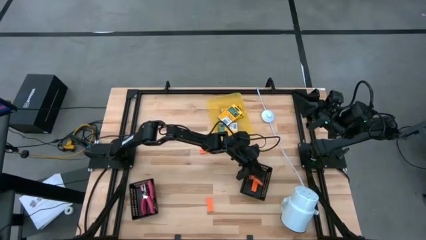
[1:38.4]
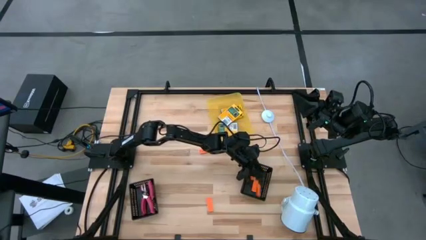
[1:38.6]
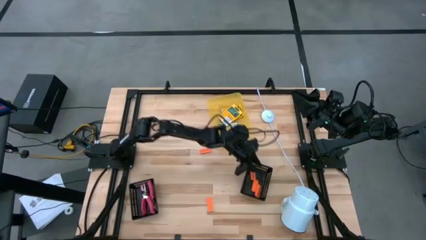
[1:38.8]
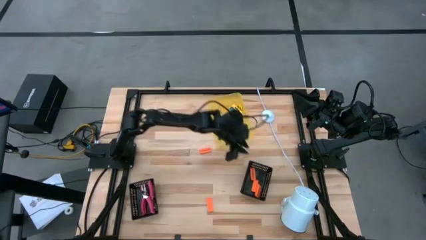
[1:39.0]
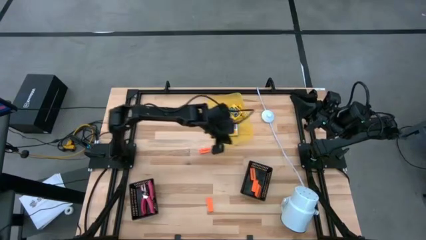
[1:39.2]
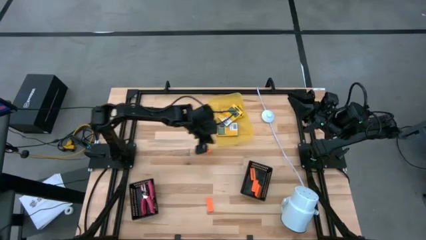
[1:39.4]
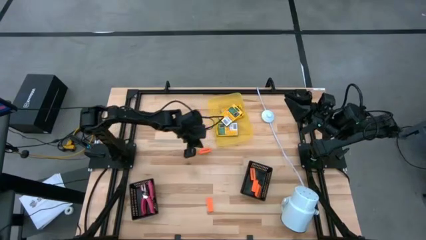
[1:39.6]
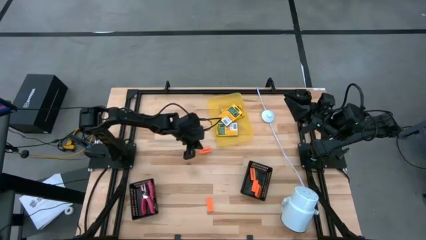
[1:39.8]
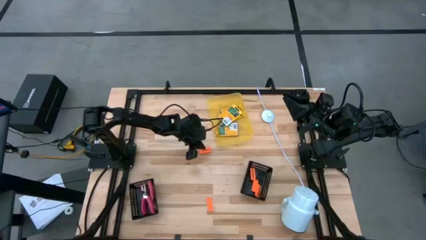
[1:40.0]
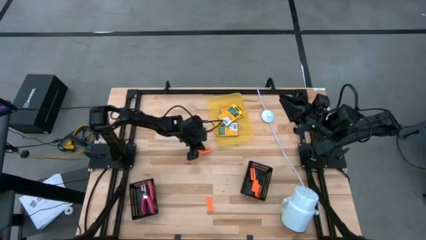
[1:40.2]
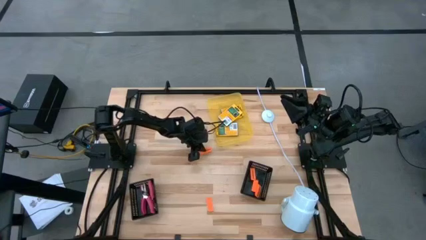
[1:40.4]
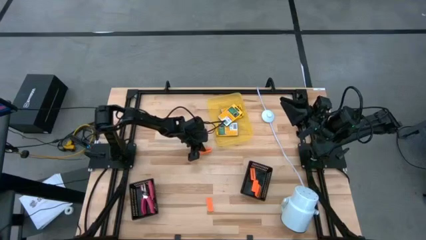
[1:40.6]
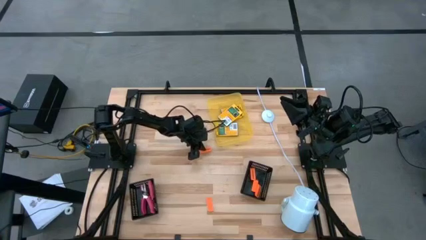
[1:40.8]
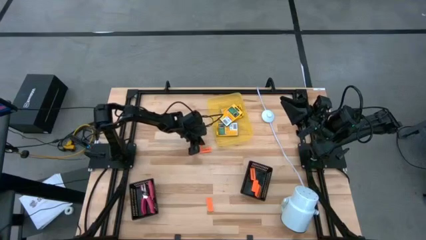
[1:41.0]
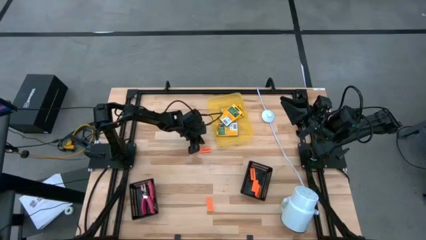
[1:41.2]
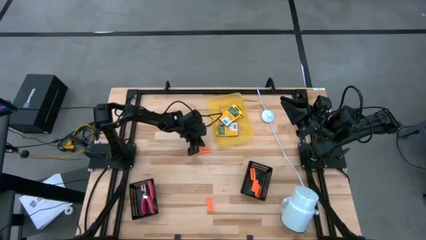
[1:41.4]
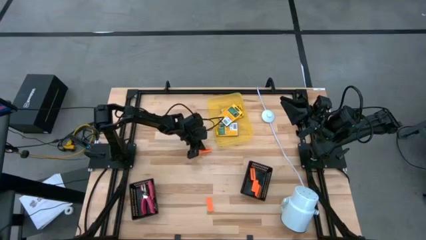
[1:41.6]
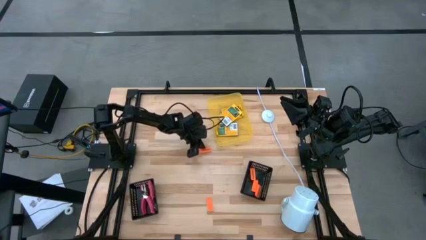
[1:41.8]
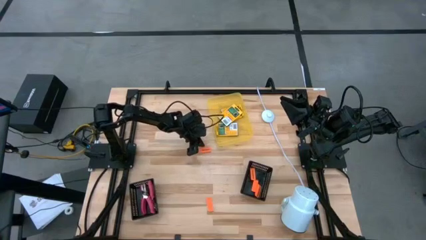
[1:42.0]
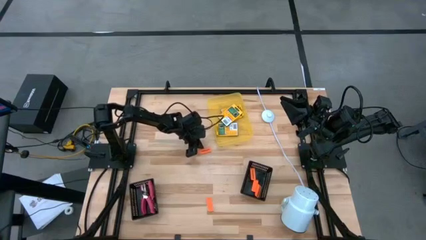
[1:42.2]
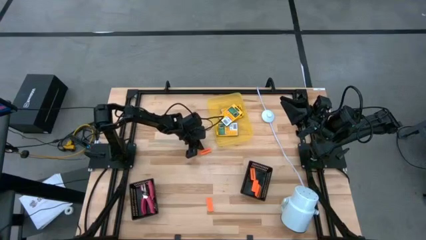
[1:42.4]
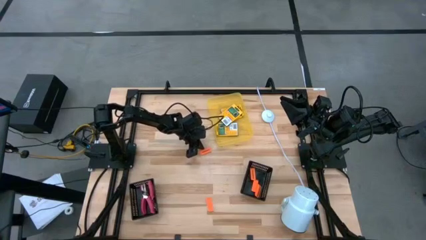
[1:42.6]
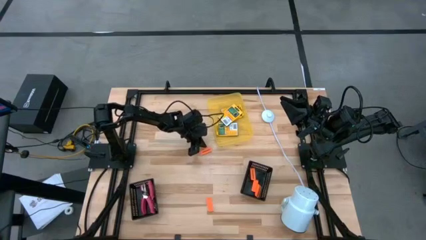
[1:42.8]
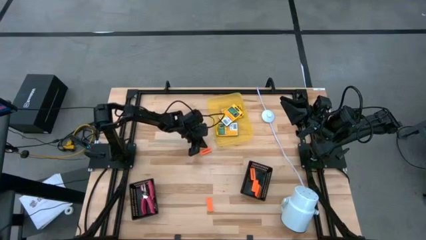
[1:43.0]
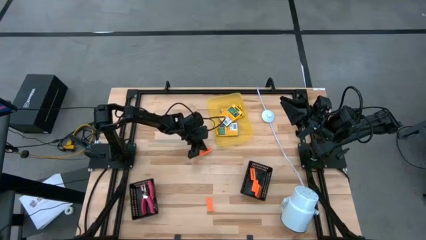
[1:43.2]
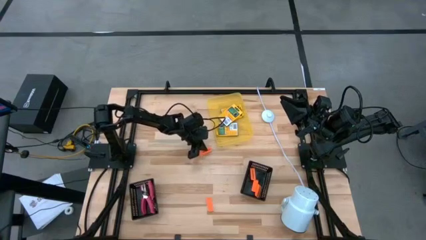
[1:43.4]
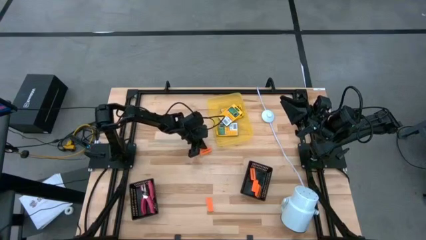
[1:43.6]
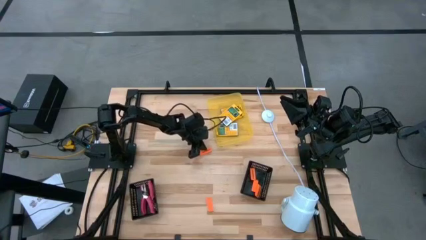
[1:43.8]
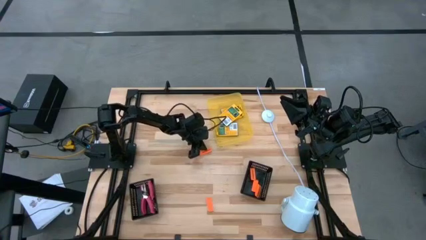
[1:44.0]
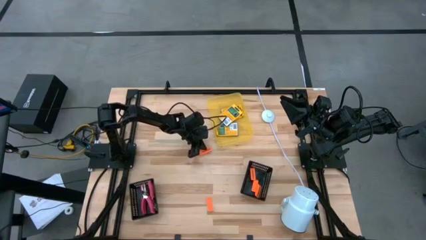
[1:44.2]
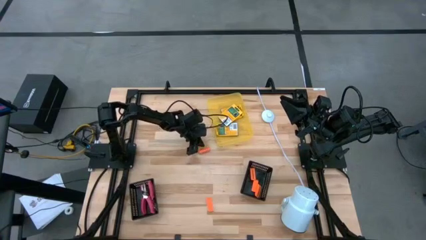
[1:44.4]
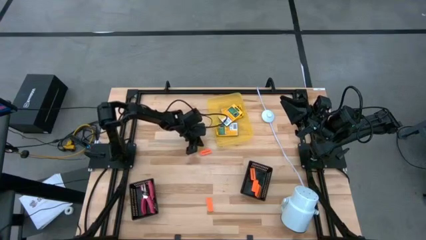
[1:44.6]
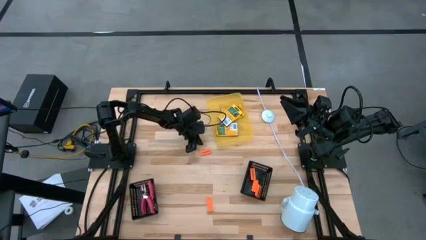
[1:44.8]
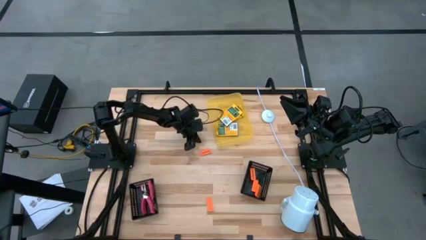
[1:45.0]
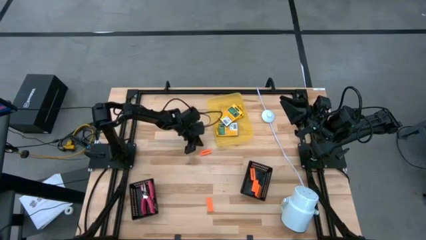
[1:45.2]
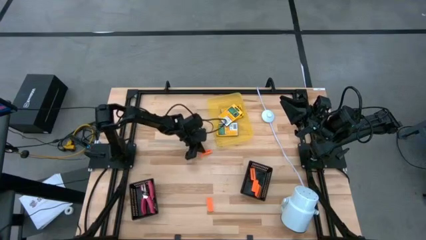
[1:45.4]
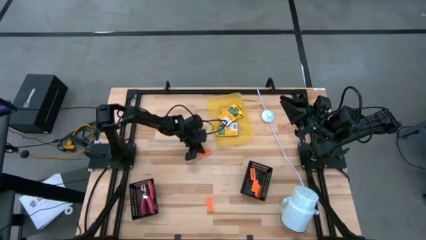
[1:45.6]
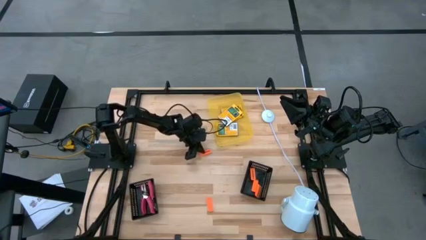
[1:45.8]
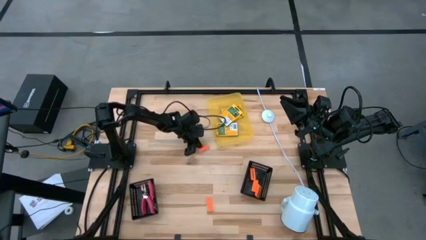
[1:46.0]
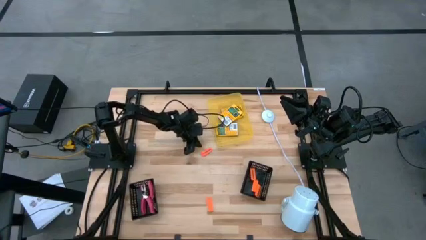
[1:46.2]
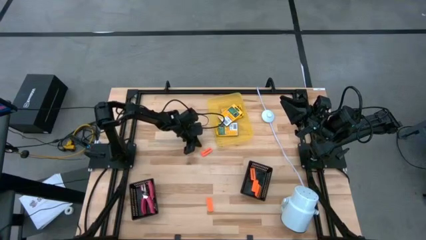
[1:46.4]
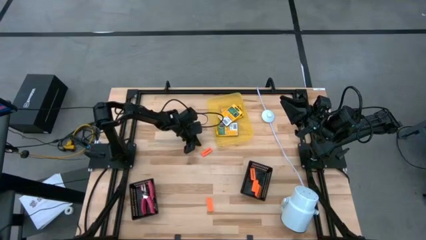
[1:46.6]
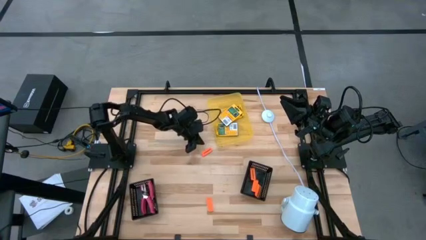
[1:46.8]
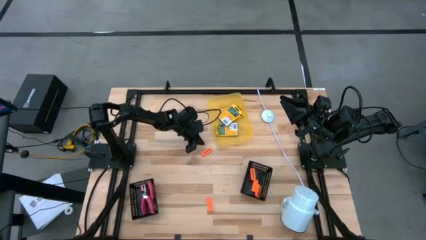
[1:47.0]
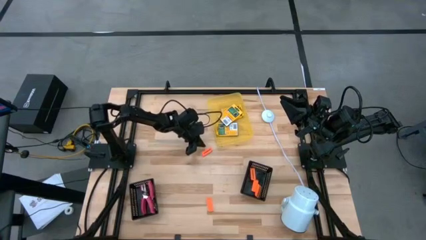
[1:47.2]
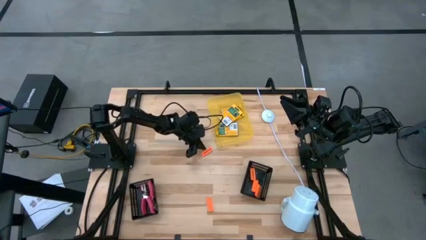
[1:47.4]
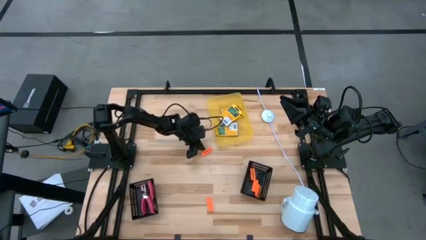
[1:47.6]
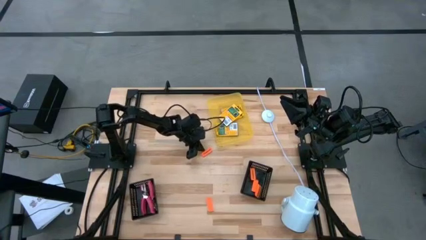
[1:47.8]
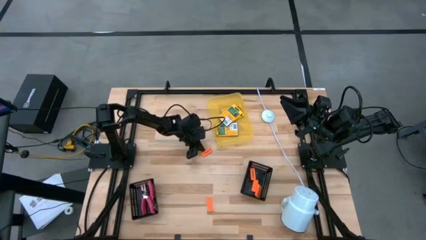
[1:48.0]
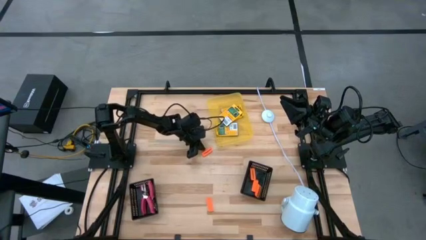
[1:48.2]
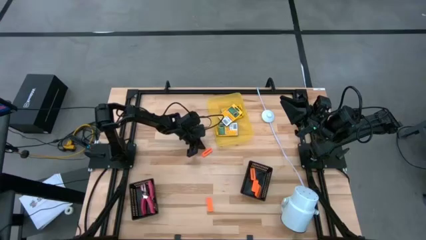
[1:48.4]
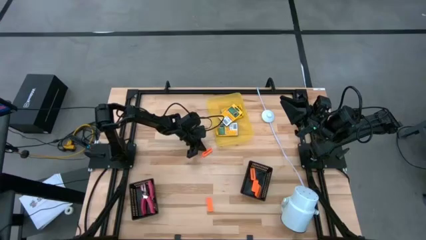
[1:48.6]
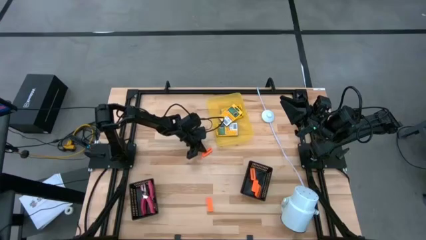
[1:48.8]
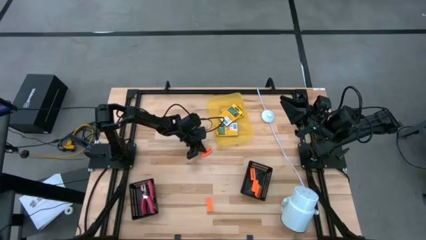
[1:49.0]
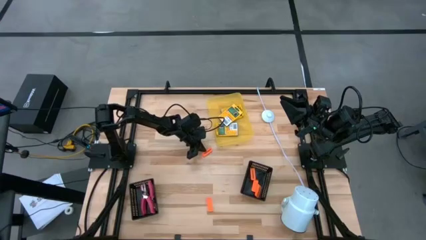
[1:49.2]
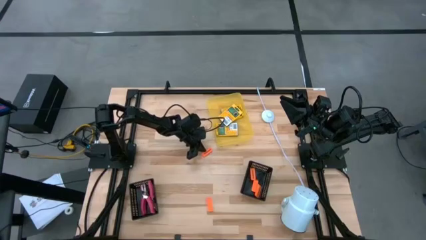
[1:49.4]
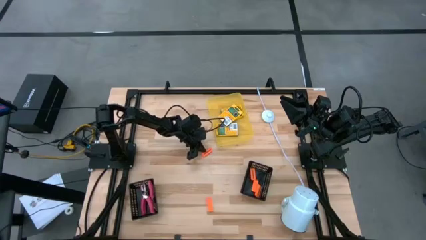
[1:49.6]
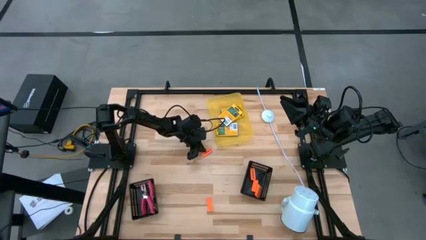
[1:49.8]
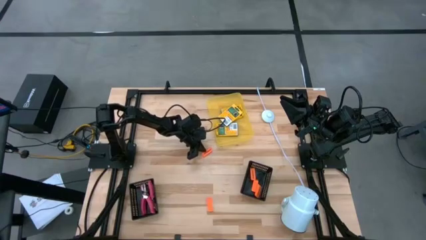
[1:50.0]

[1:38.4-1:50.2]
Task: Pick & Place School Supplies
Put the orange eraser into the right black bin

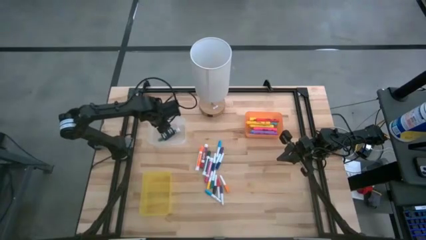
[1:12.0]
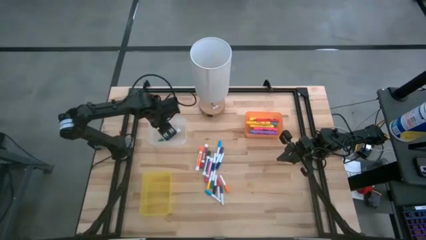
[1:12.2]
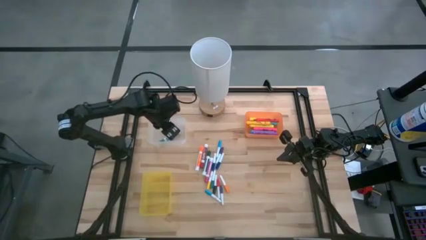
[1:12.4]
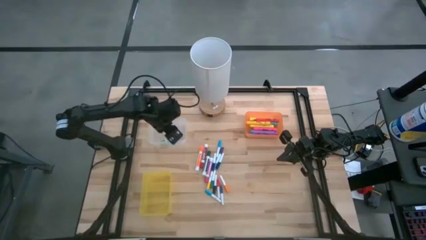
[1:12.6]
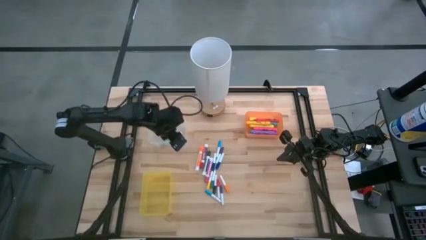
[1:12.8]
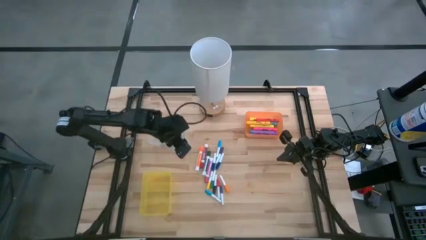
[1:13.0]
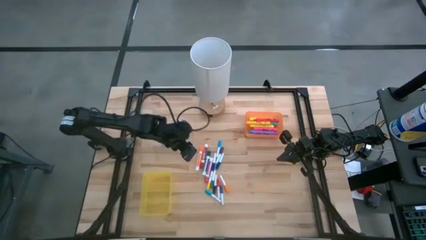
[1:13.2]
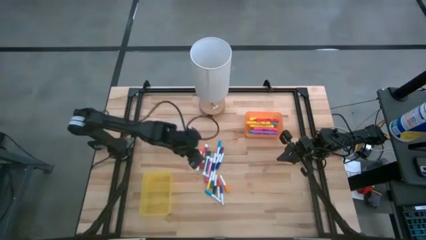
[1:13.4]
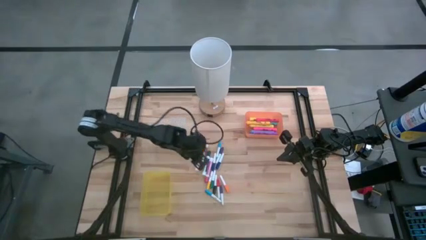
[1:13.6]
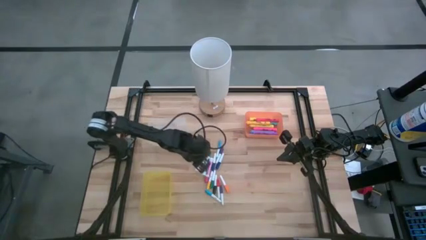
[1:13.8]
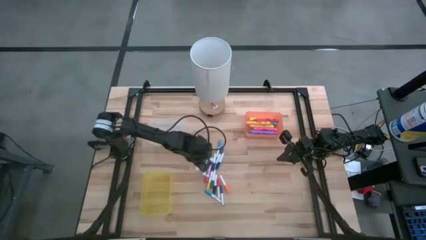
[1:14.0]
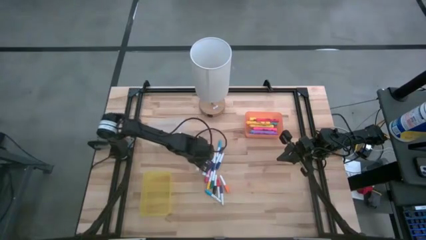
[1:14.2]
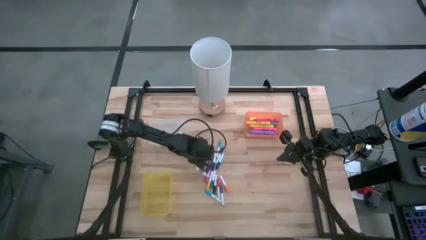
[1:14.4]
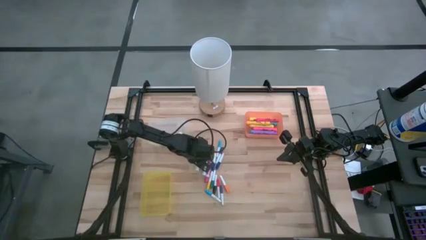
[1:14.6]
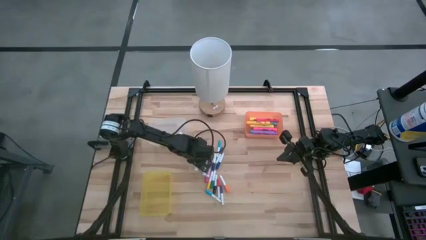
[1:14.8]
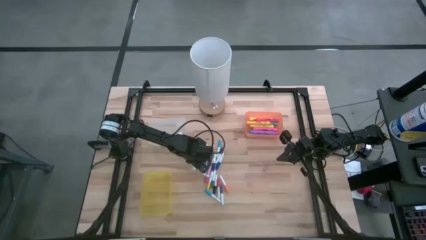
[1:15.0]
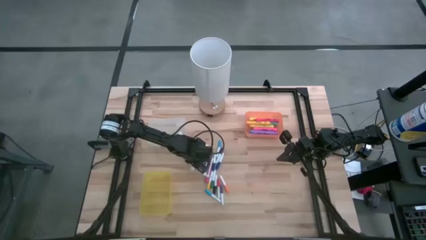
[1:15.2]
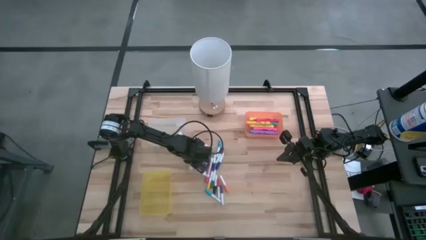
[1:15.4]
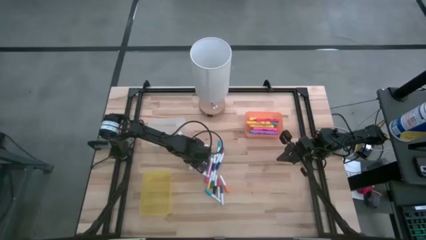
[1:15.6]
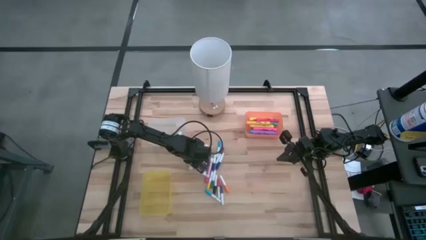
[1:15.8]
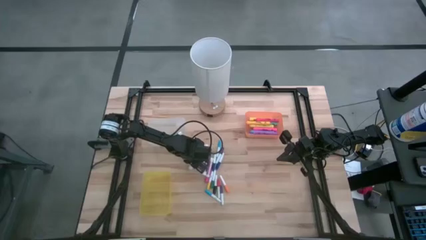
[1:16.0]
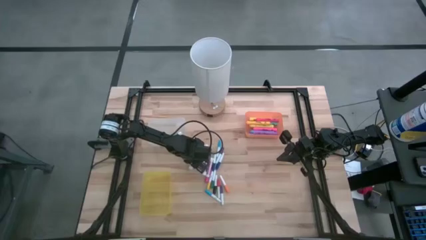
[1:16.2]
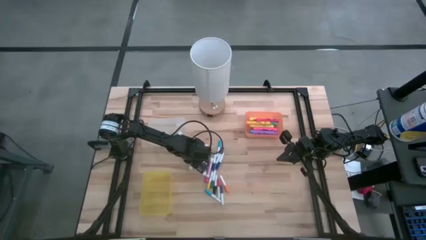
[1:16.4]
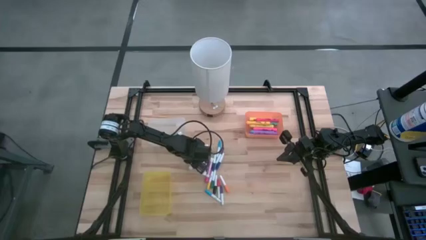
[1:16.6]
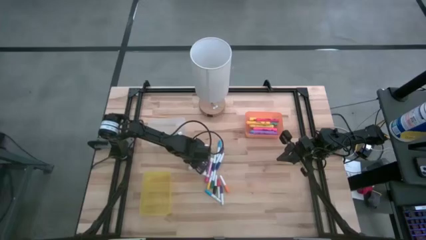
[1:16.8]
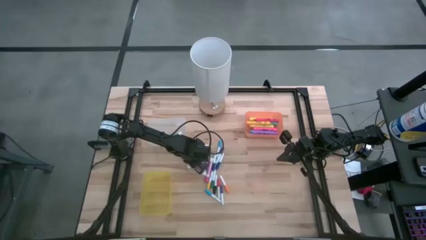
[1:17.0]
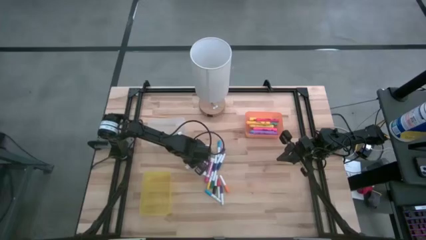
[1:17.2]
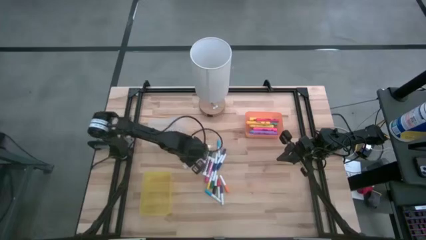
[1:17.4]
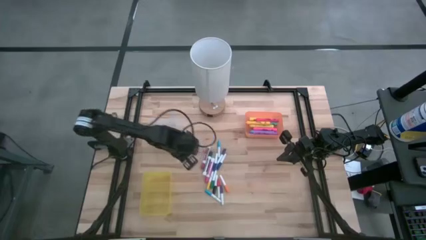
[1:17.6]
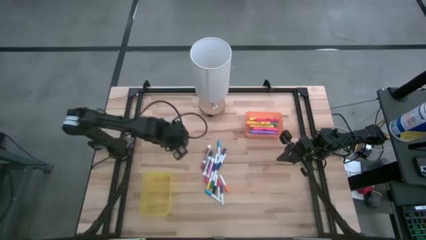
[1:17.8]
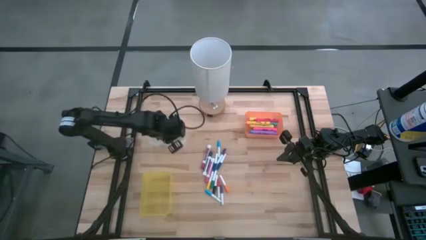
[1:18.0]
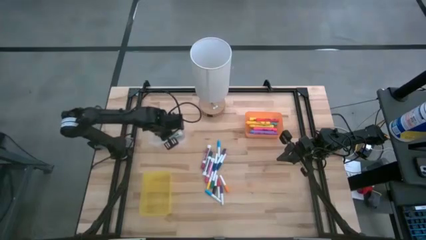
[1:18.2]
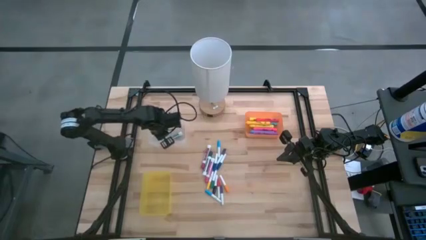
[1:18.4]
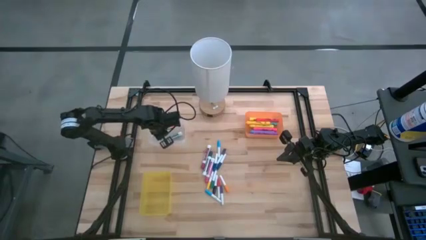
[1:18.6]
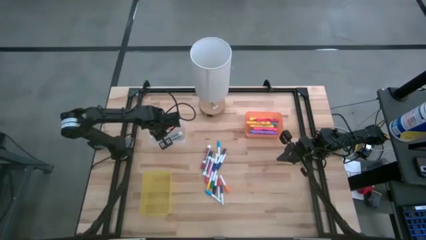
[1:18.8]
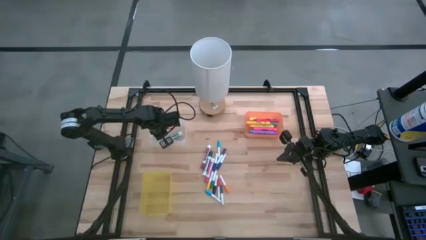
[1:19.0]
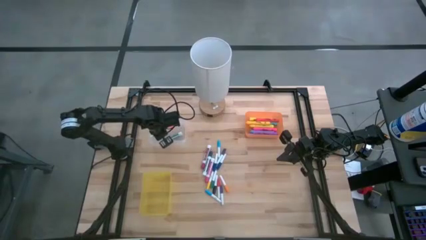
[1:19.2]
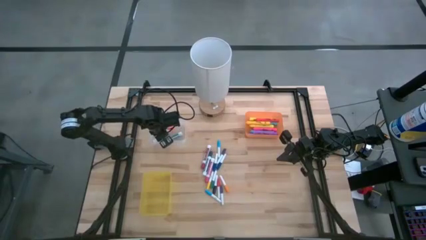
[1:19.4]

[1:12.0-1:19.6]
Task: Pick & Place Markers
Put the orange marker pen into the white bin
